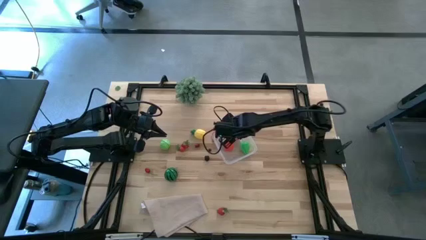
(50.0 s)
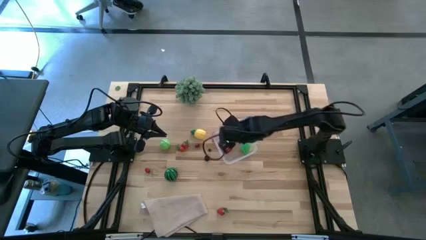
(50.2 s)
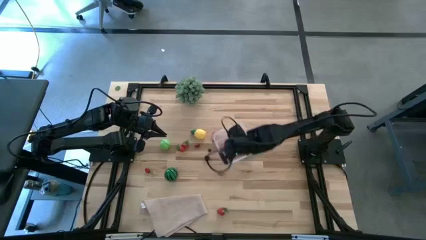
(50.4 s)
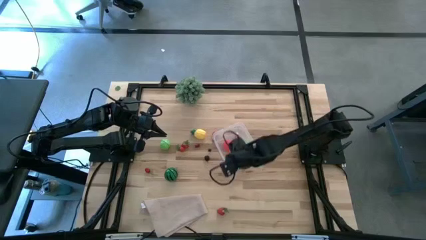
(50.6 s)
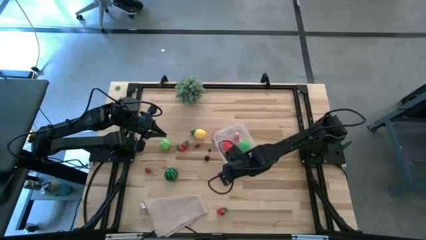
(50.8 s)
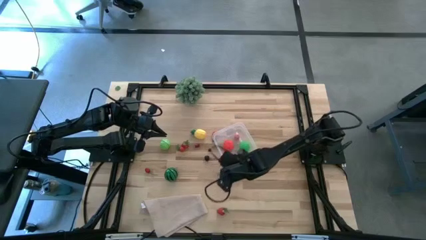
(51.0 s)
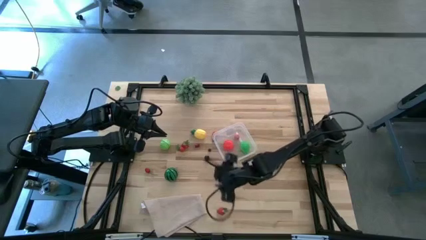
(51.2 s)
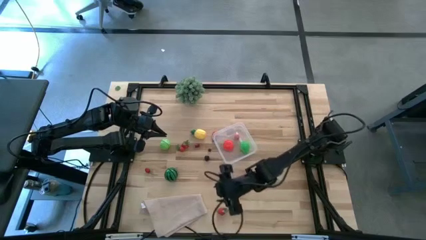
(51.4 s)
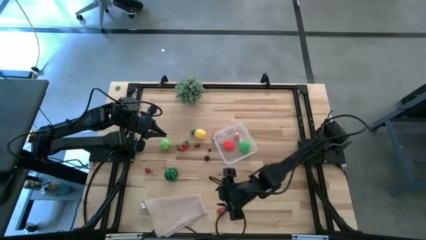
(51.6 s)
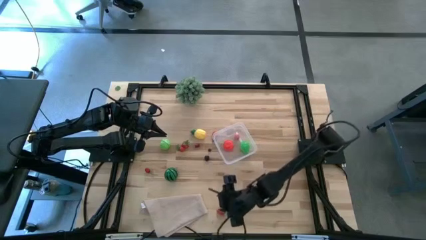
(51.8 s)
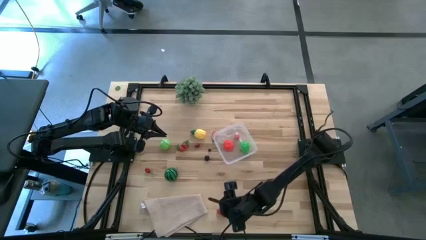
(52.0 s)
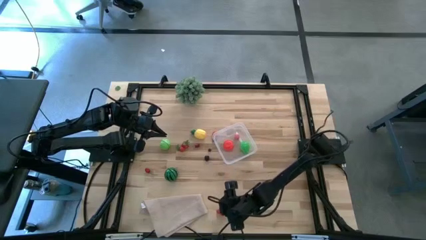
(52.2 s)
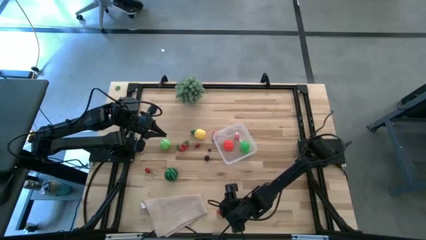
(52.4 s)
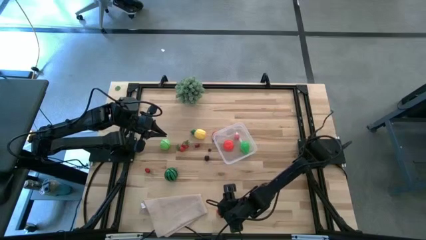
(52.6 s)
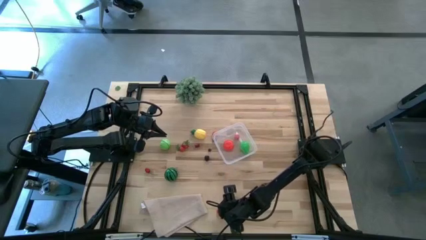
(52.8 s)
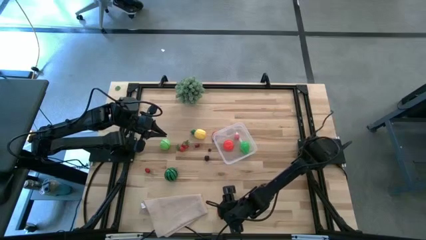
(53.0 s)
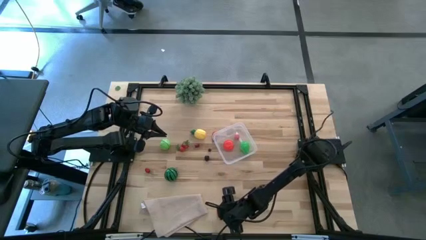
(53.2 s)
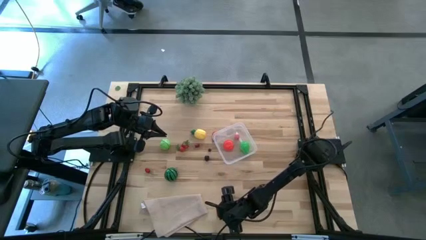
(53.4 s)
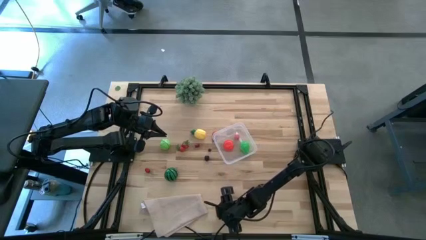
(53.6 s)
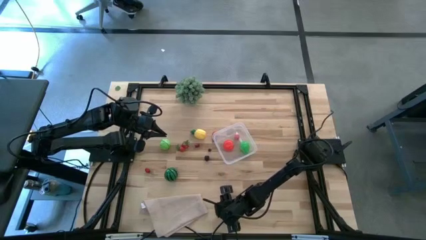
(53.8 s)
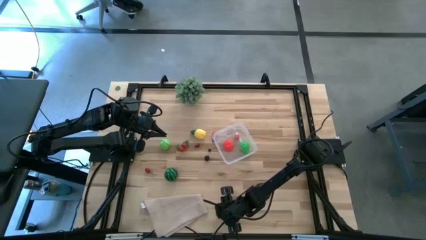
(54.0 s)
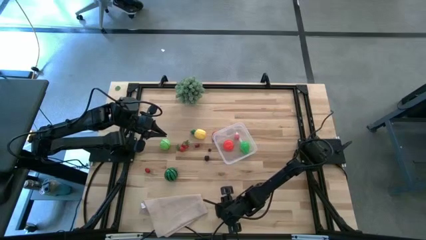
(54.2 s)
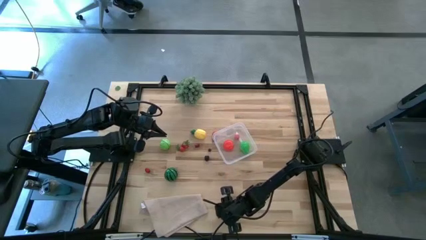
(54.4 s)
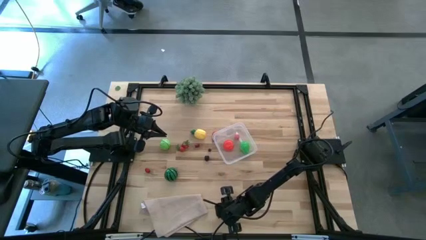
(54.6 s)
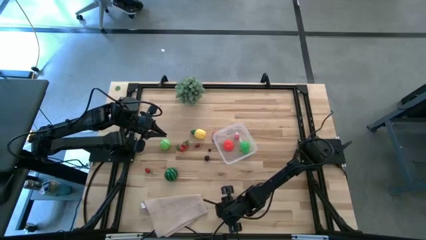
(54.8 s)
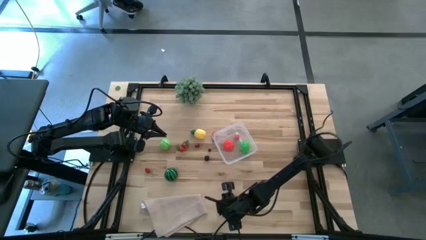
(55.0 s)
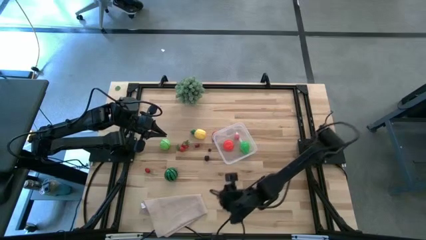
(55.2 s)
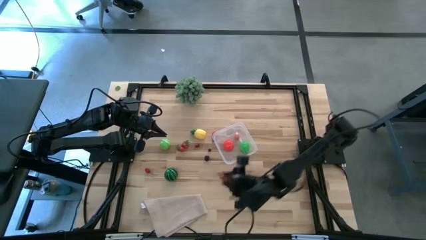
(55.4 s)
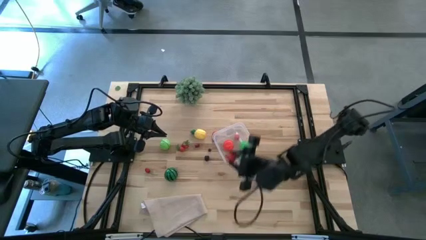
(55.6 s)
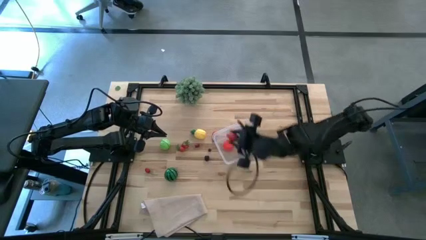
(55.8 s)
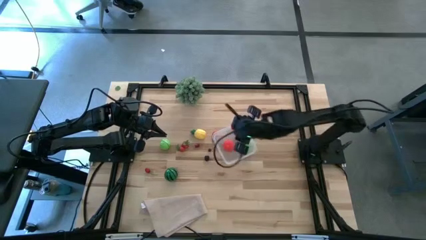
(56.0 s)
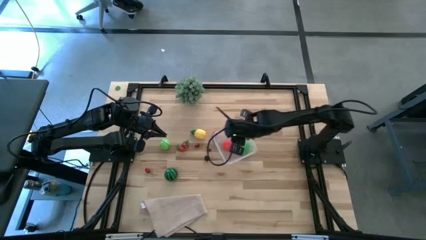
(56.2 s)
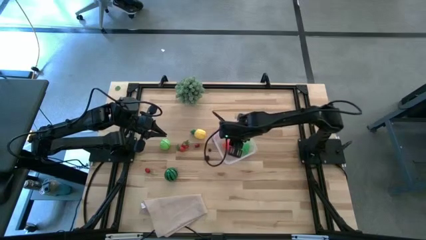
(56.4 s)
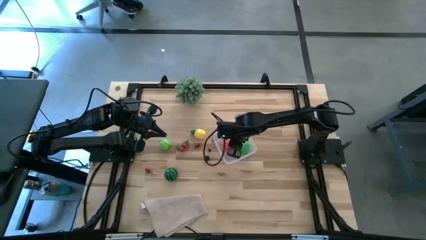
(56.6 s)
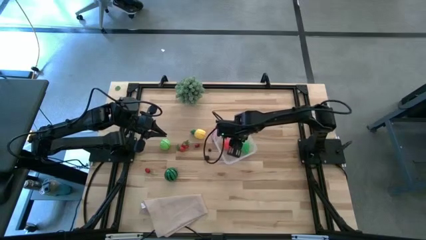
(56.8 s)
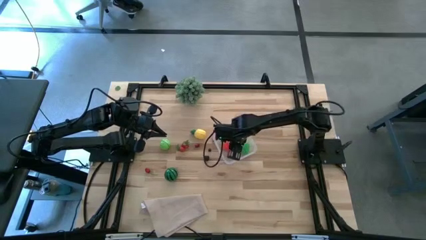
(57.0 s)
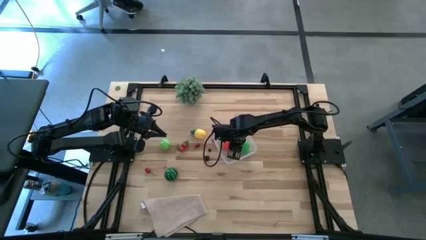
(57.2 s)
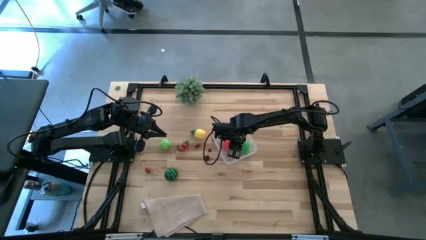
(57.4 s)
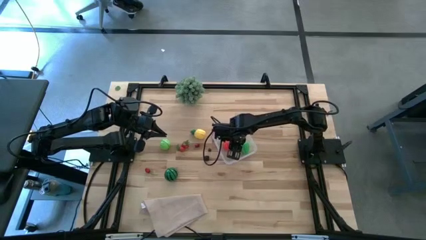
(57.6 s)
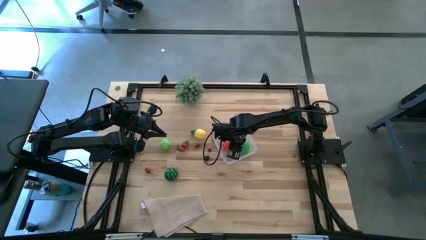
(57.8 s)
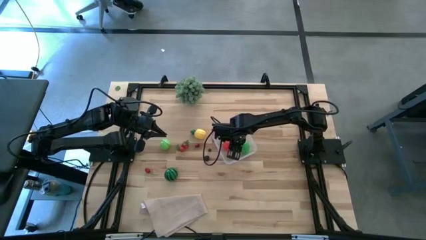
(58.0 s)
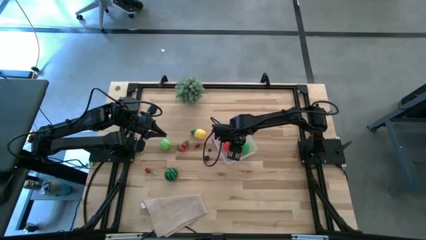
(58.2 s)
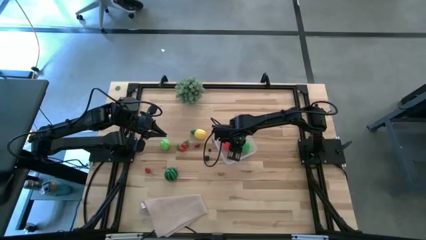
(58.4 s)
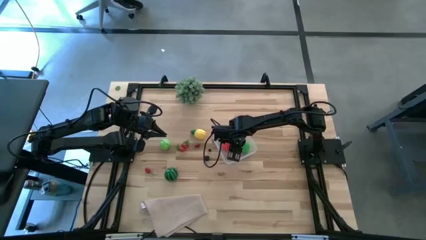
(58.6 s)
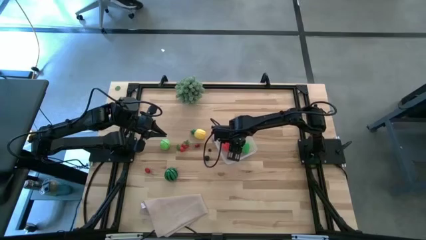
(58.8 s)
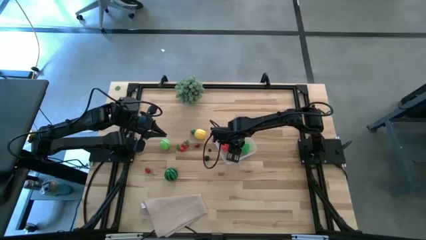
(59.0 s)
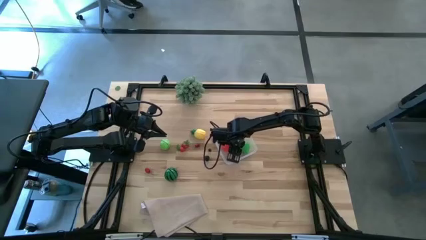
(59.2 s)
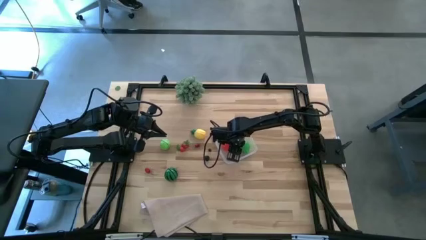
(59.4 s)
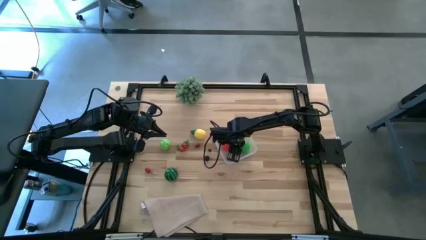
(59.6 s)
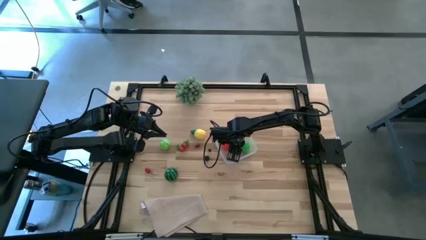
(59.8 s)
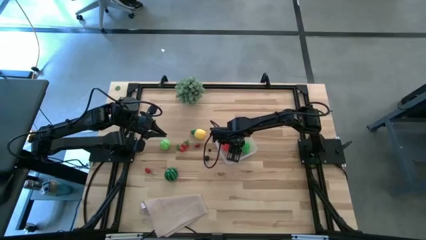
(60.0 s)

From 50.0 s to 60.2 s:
Task: Pick and placing Produce into tupperware
Put the bottom strawberry into the transparent bin

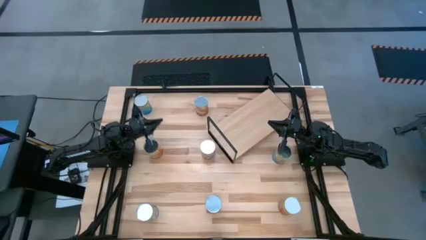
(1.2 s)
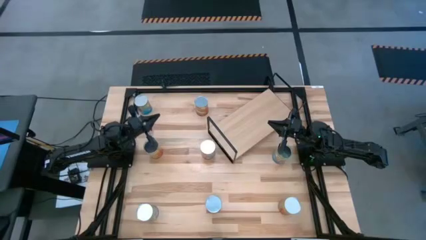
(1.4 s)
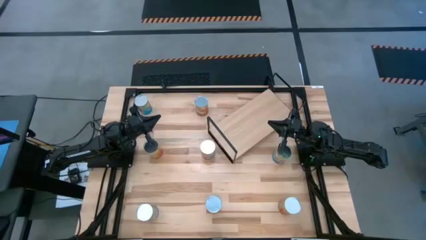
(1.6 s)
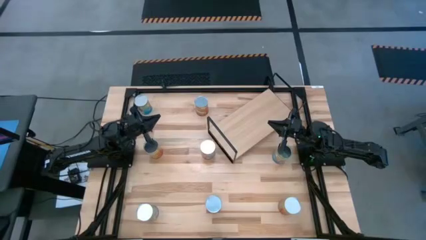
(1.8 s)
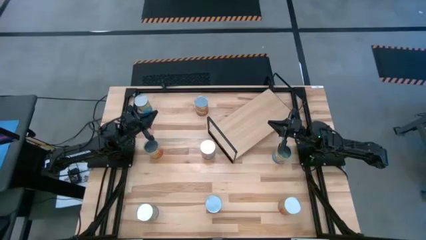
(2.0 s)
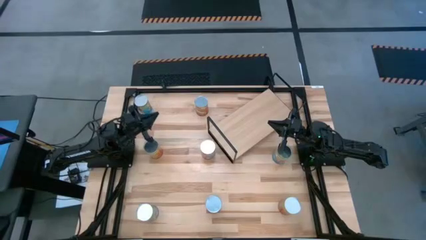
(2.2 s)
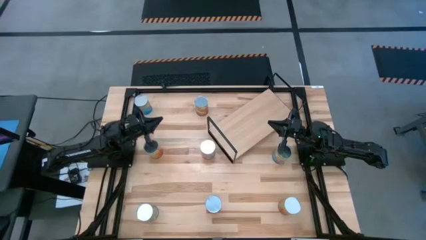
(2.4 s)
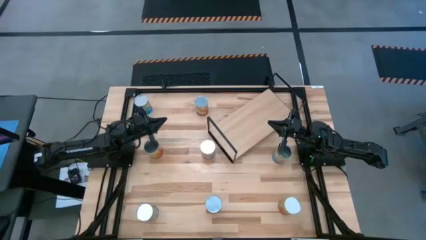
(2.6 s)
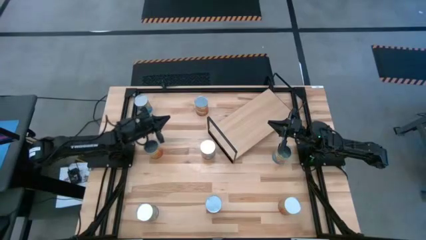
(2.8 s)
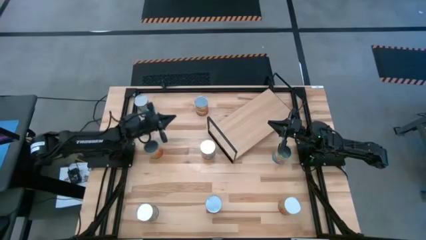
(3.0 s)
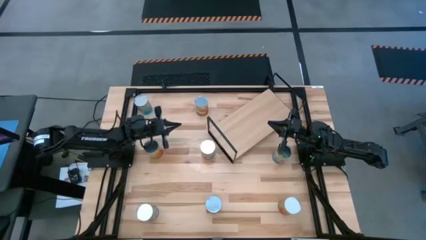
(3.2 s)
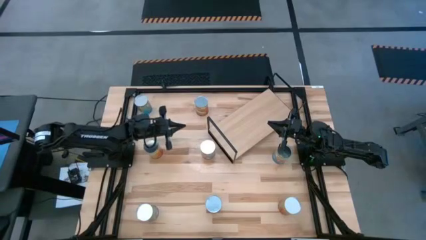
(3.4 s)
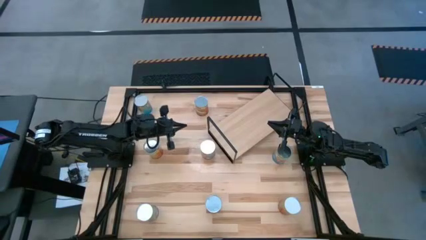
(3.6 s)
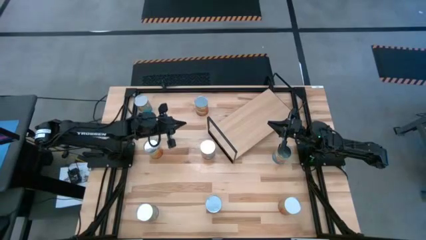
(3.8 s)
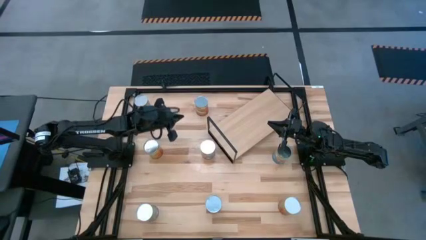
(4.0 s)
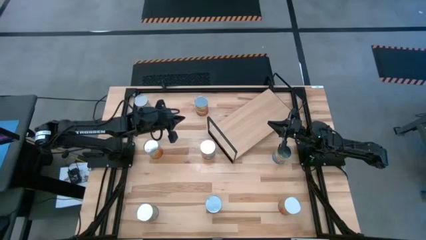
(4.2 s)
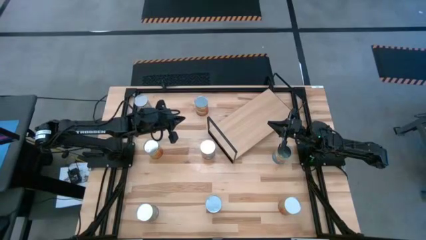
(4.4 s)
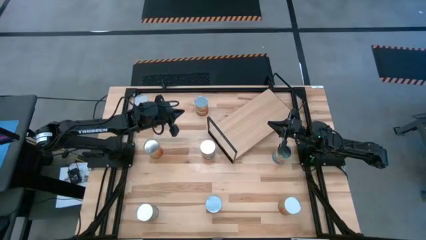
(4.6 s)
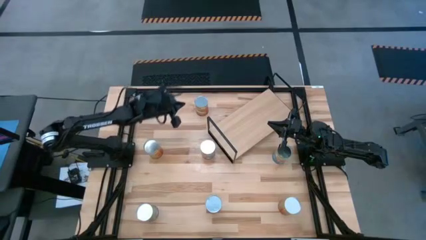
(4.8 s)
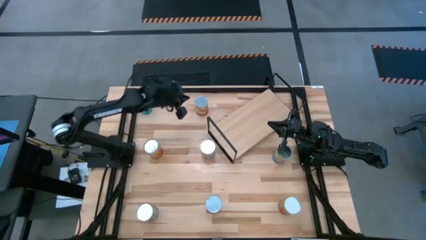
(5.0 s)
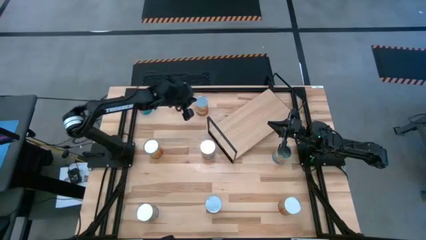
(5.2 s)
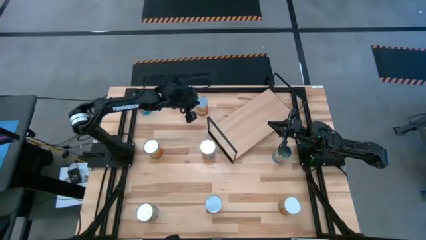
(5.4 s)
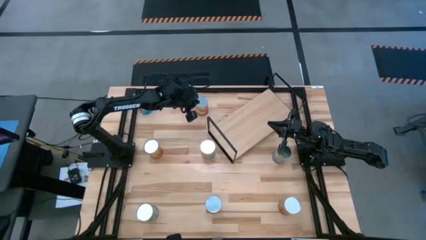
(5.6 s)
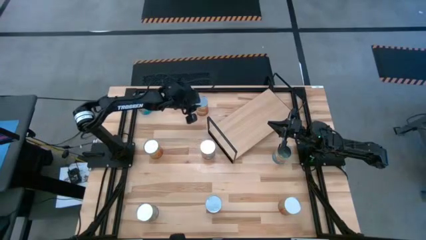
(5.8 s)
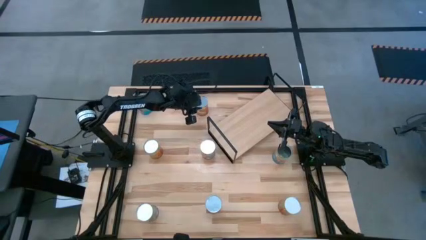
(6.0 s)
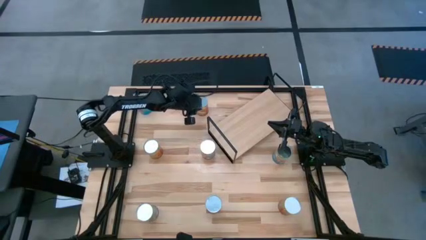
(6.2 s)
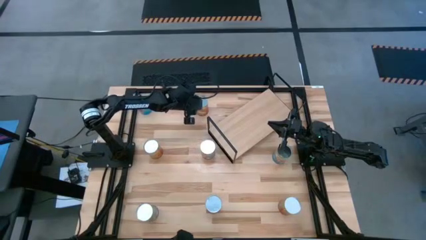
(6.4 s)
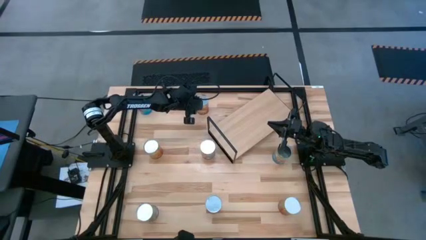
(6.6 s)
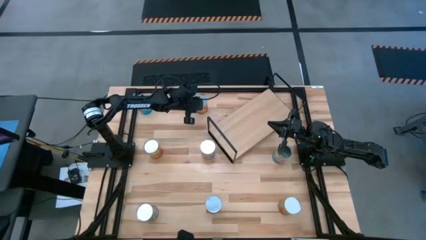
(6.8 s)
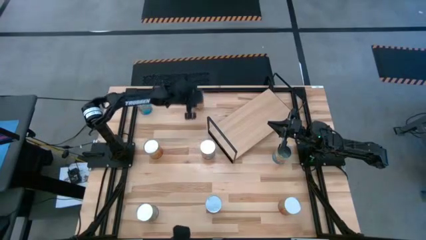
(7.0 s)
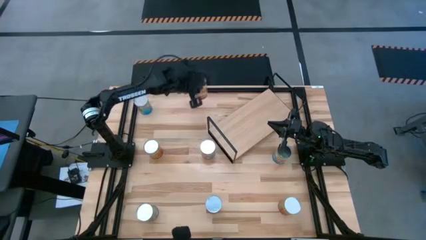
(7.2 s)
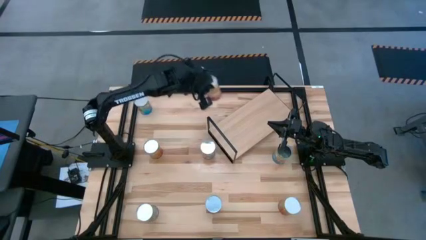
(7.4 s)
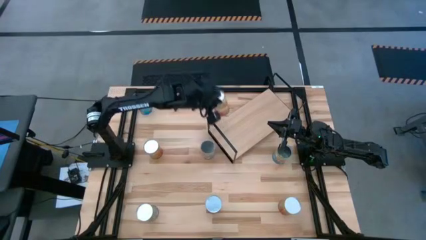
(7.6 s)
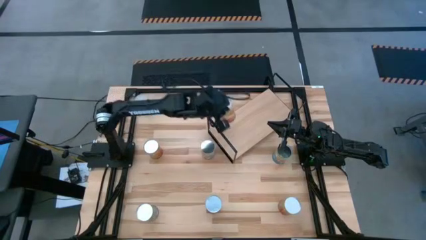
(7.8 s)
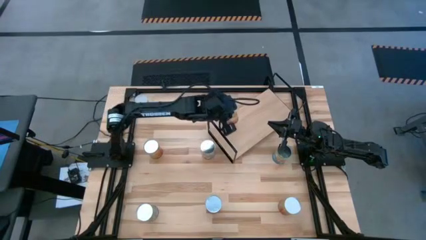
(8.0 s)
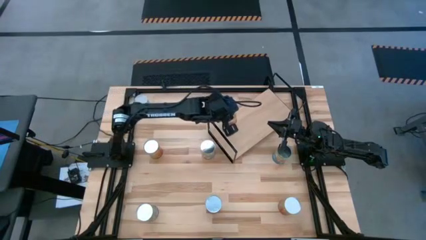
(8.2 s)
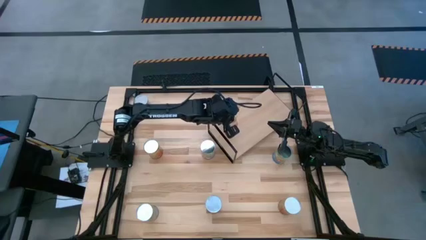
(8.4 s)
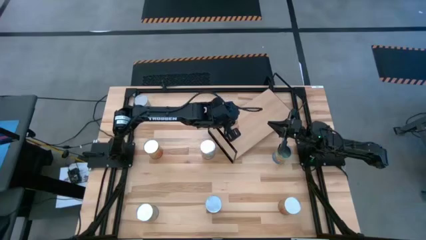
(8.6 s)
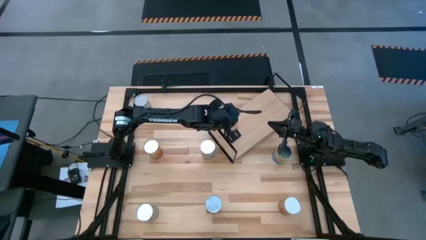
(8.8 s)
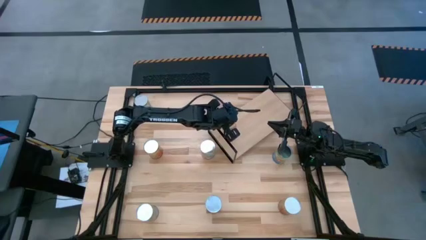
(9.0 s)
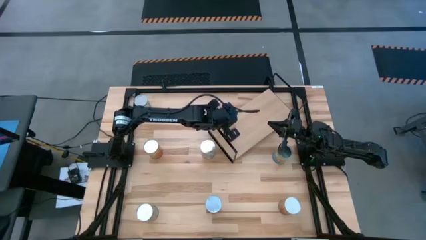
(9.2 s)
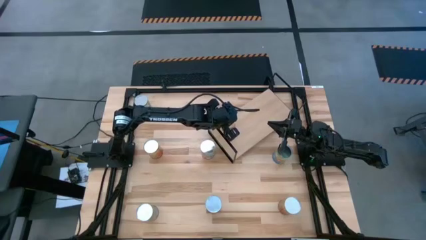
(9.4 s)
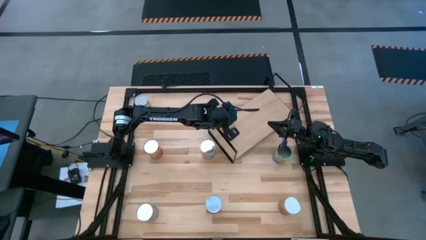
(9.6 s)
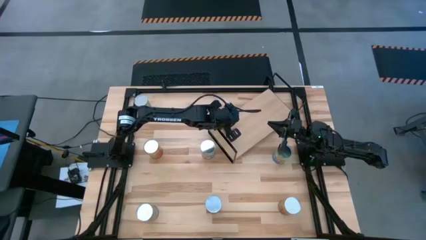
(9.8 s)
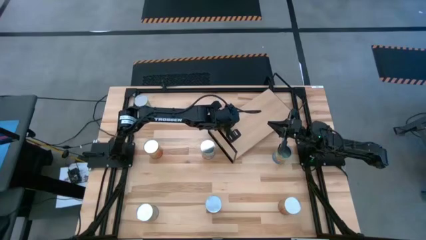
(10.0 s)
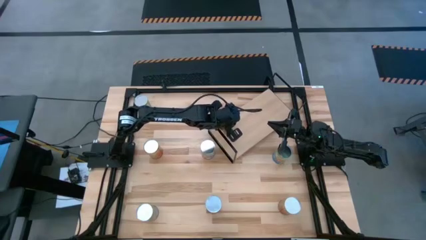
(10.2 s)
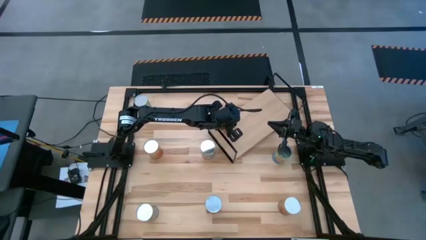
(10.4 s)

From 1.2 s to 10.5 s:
Task: Pick and place cans onto a shelf
Put the top canned corn on the shelf
